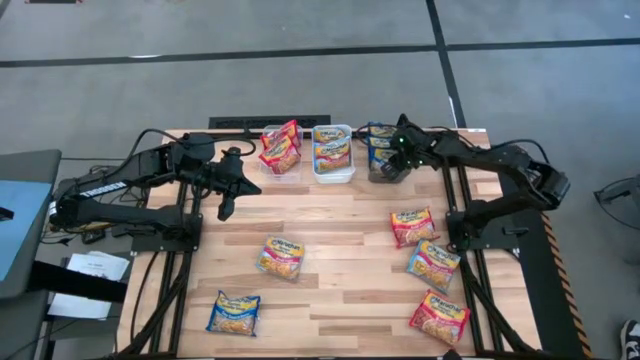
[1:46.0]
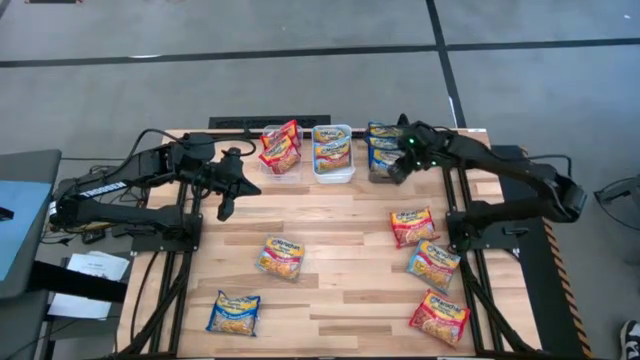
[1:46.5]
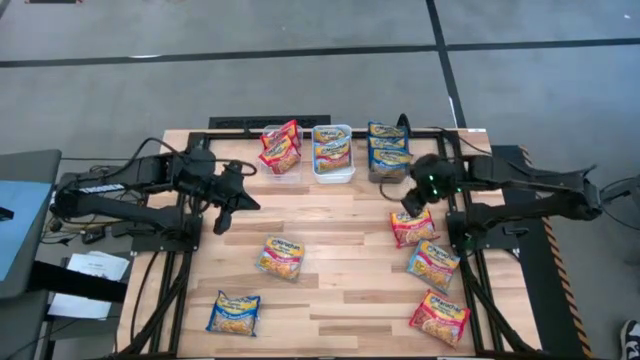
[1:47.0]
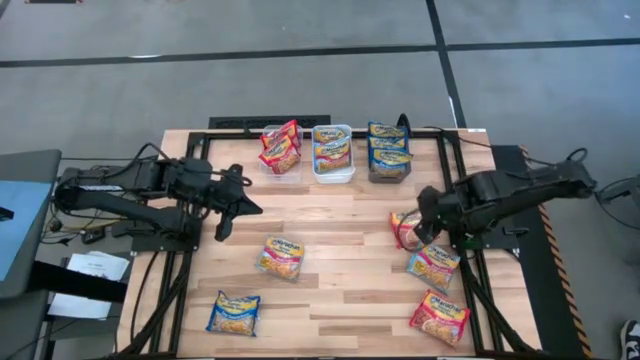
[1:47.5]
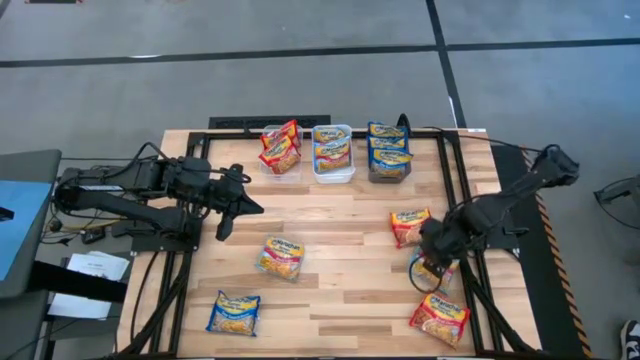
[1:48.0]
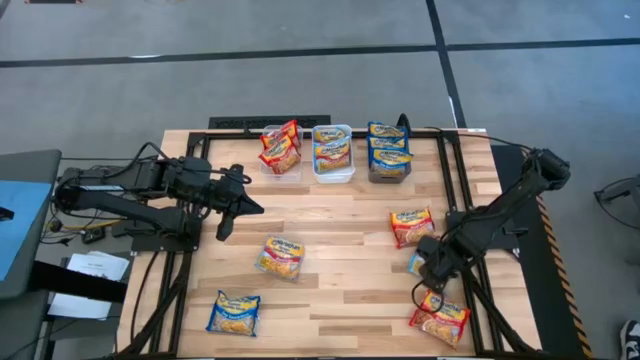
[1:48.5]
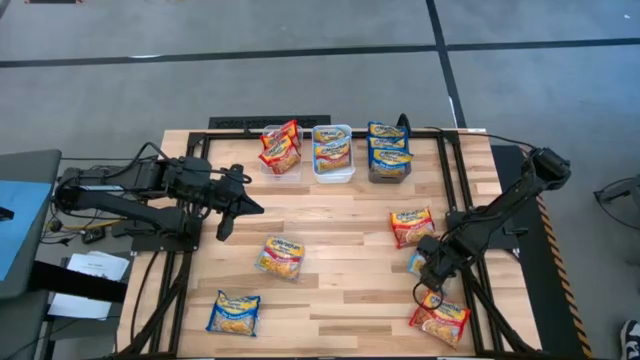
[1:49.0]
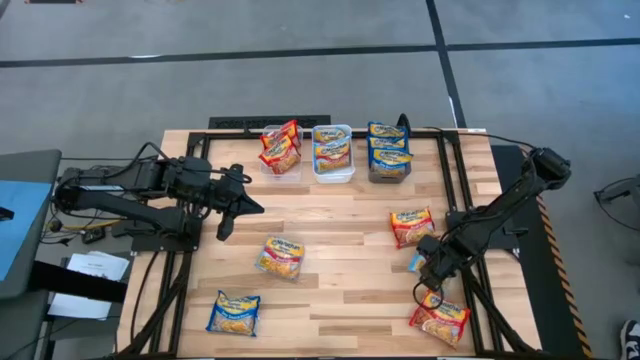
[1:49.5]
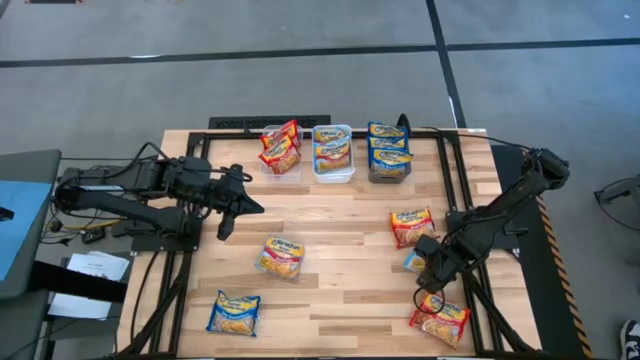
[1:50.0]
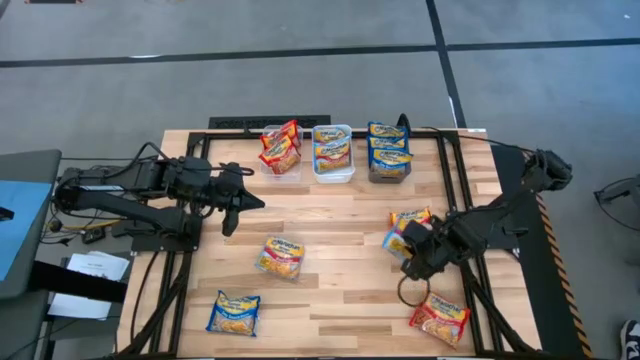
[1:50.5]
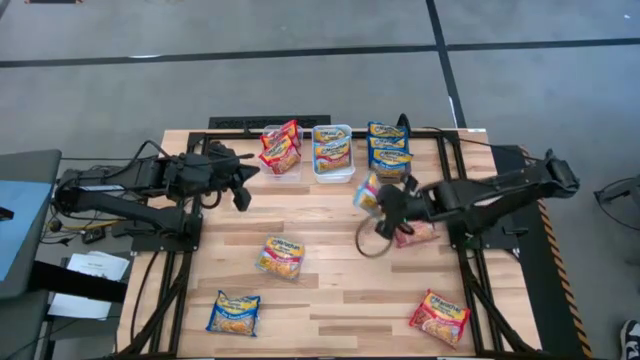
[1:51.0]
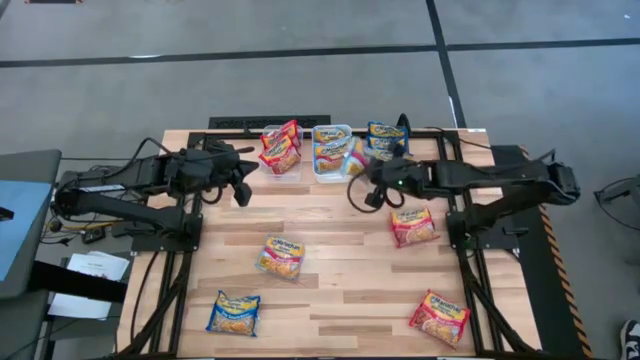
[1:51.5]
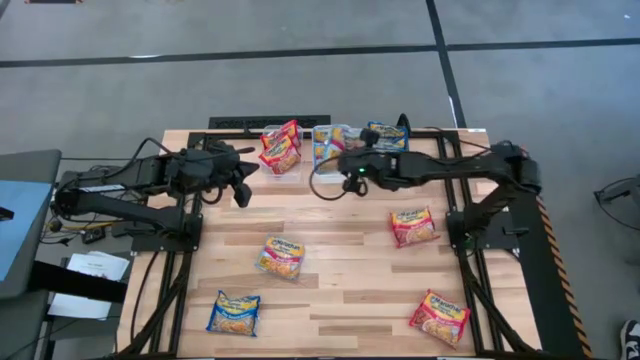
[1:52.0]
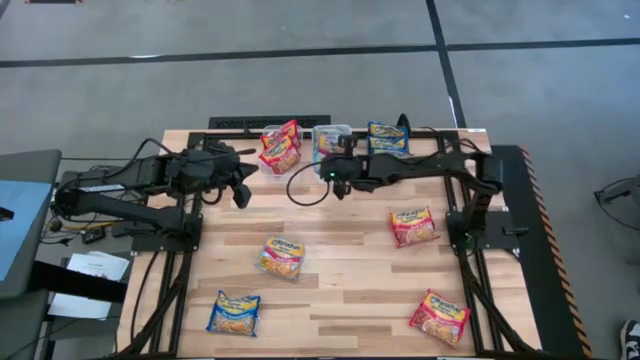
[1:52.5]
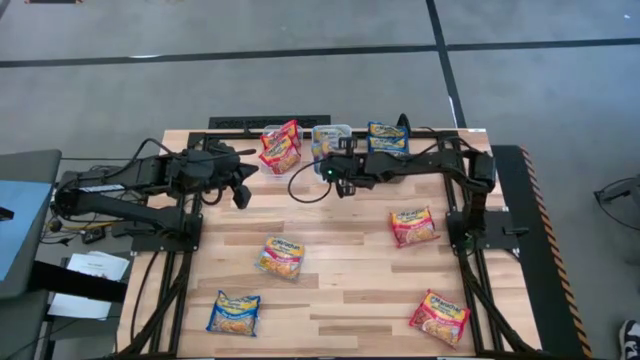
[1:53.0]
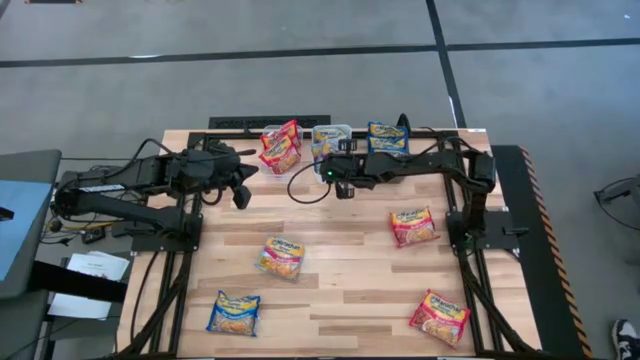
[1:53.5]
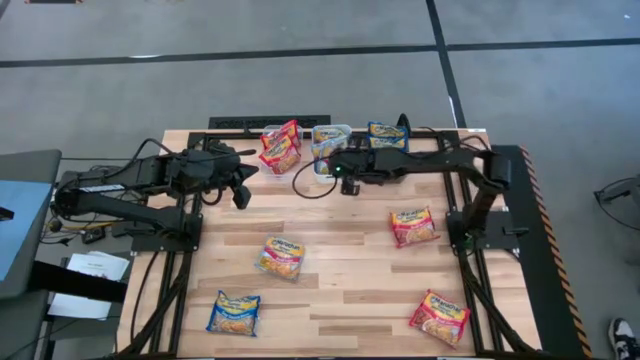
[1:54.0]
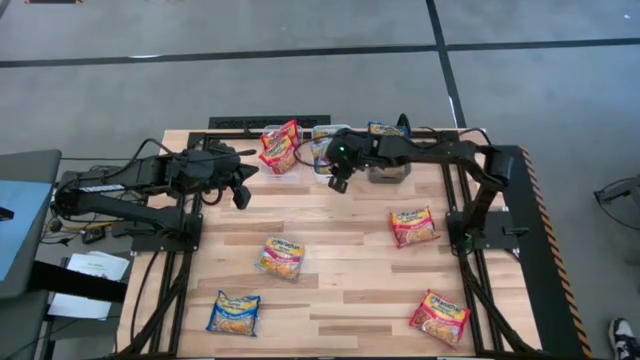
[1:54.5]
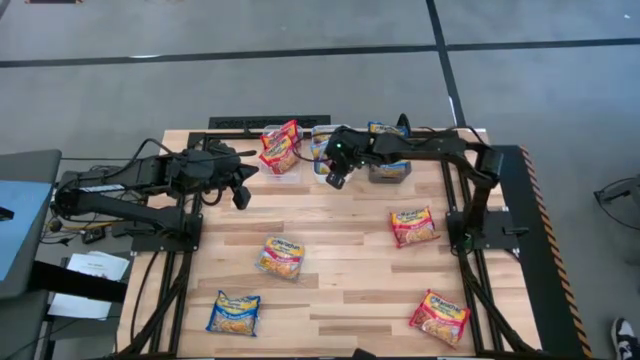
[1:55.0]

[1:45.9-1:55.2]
Task: Sort Maruchan noodles
Put the light blue noodle pack into the white bin

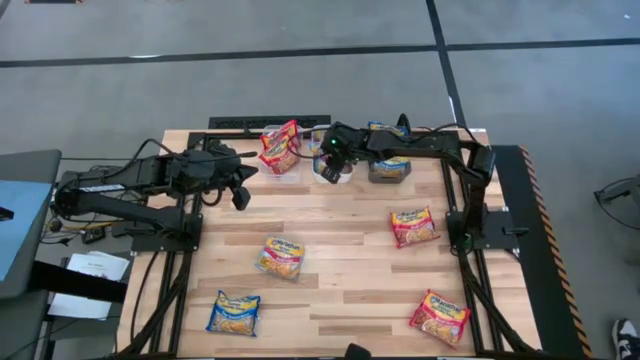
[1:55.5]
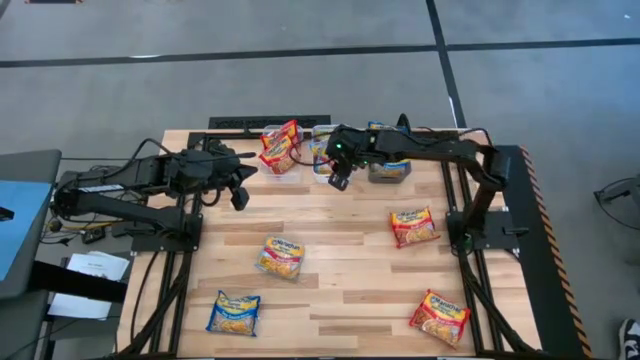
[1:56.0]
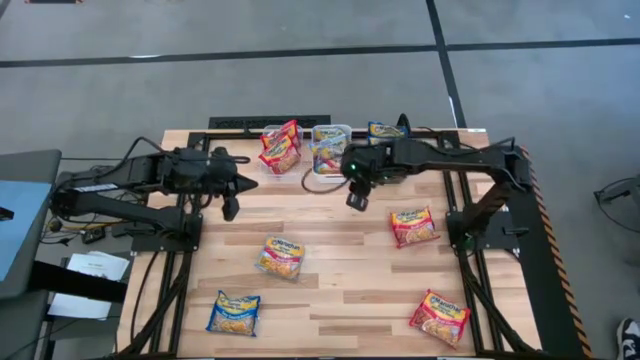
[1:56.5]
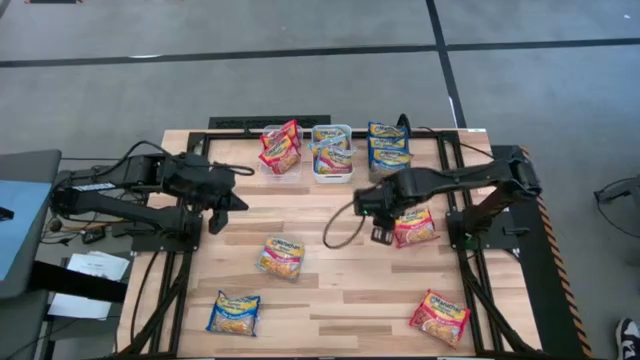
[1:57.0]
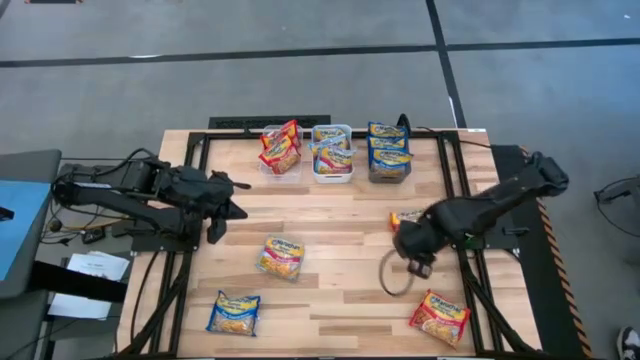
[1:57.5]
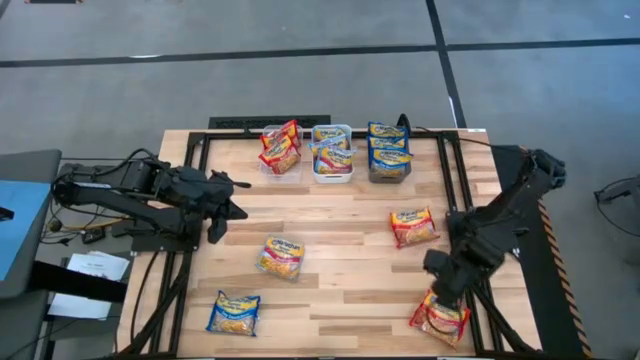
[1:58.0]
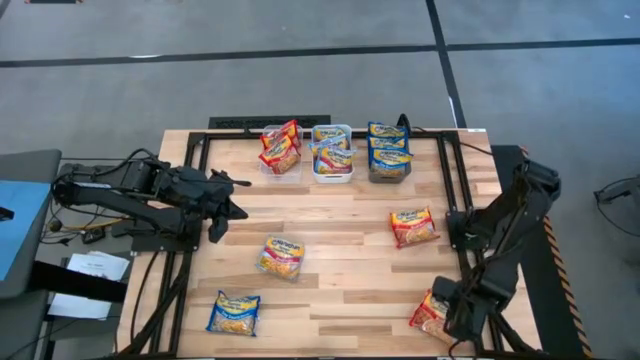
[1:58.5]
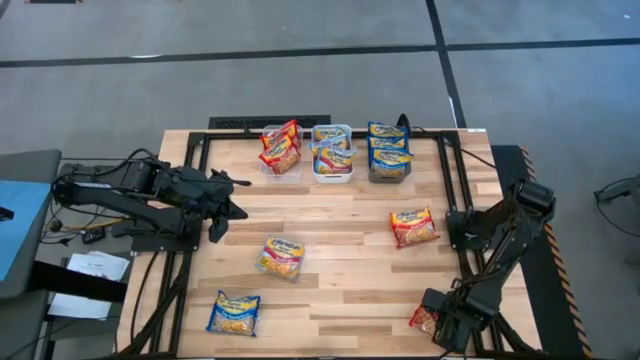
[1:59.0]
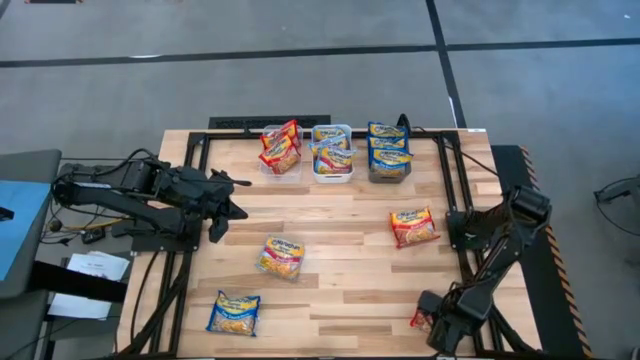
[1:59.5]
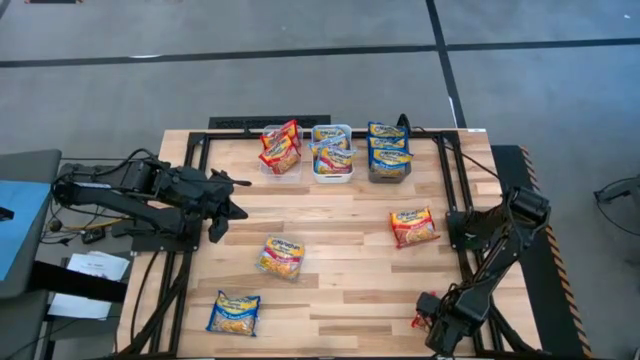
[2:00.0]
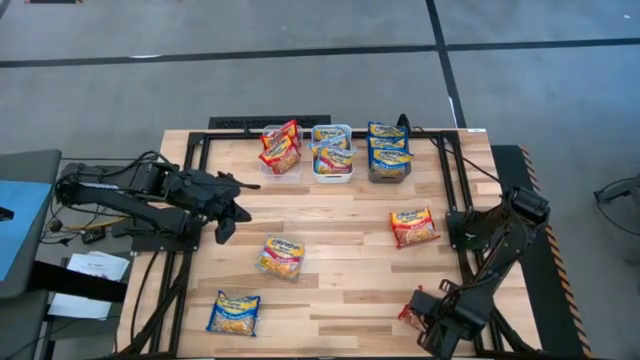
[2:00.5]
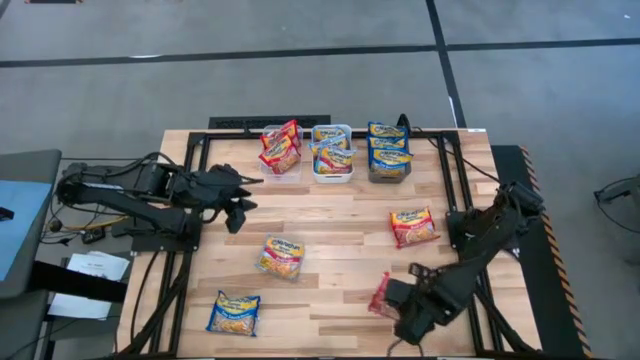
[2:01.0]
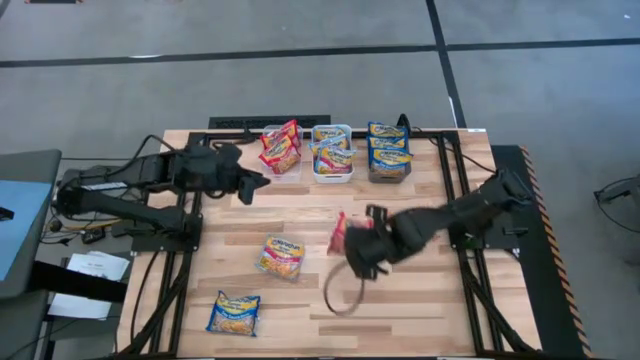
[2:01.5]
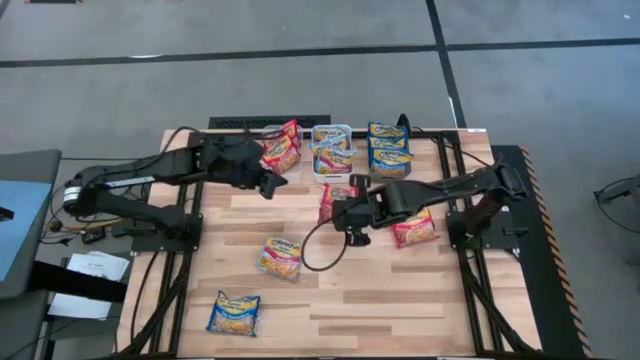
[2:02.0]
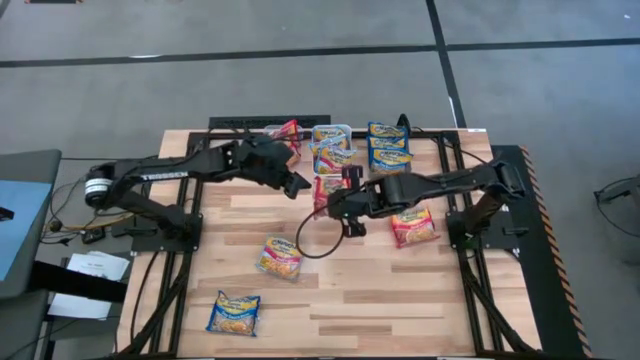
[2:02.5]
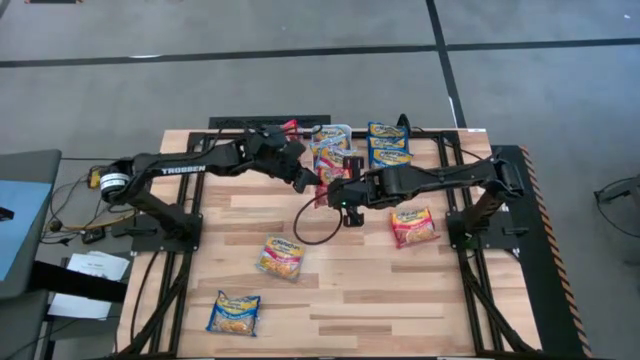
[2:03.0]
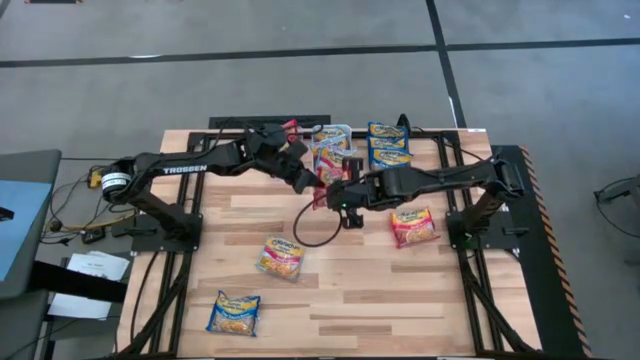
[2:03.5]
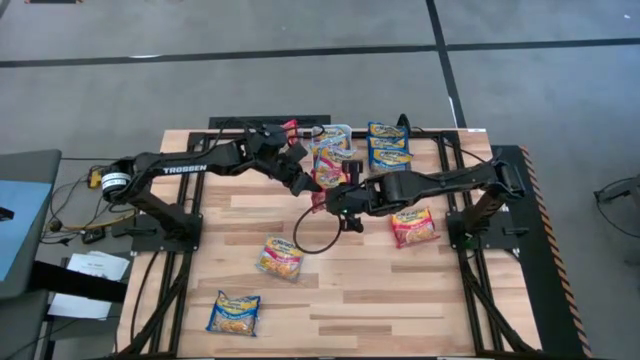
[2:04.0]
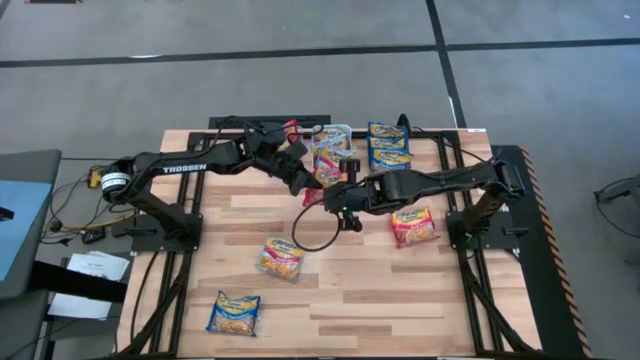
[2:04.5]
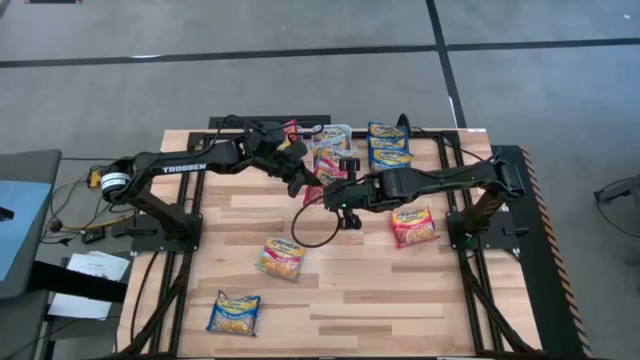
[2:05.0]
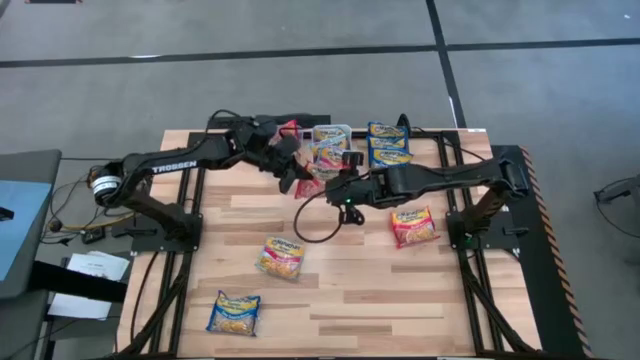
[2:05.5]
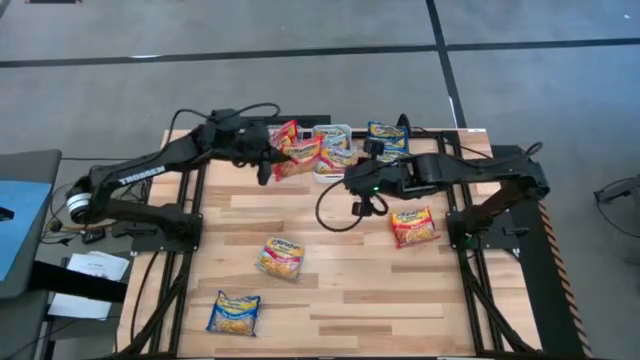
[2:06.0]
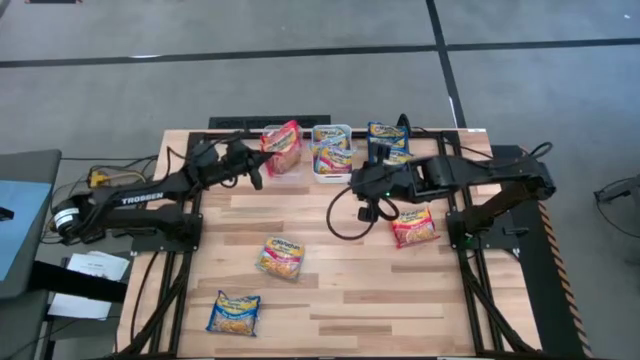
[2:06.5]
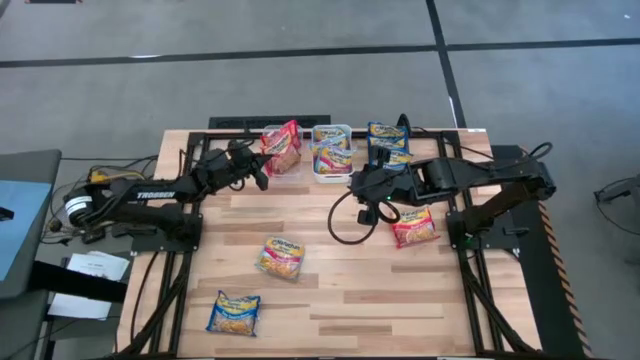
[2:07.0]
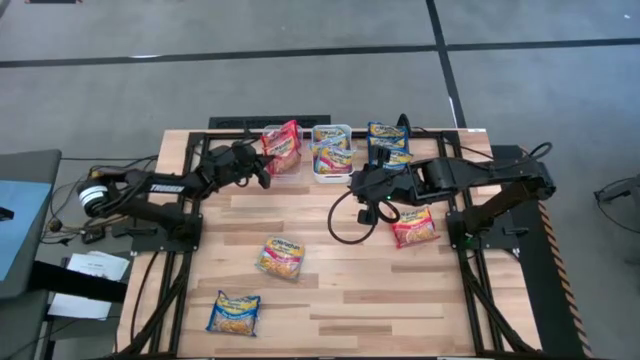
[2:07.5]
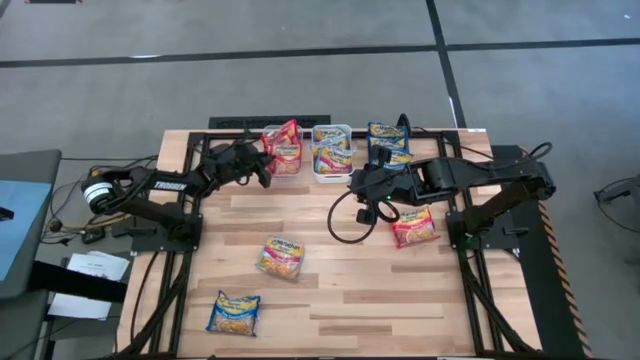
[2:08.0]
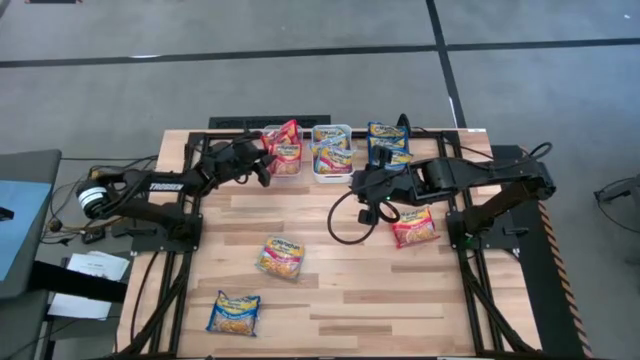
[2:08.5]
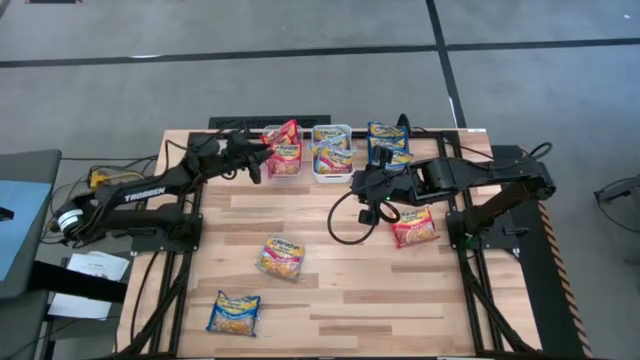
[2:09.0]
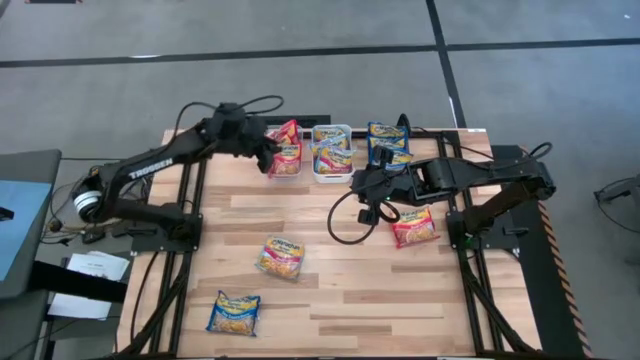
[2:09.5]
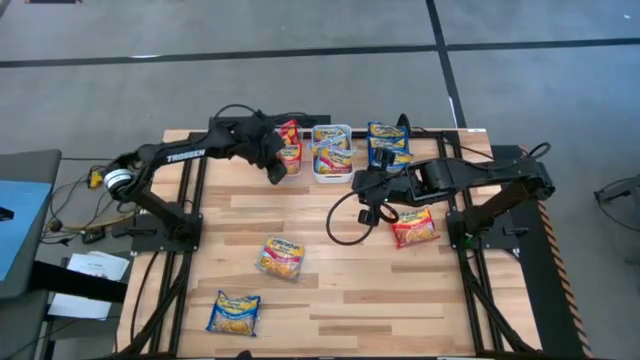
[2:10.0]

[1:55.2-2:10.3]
Put the red noodle pack into the transparent bin
